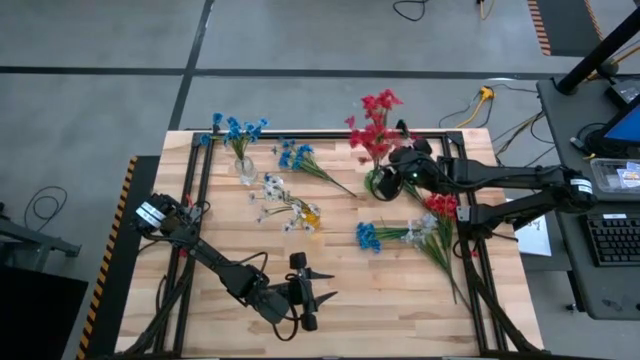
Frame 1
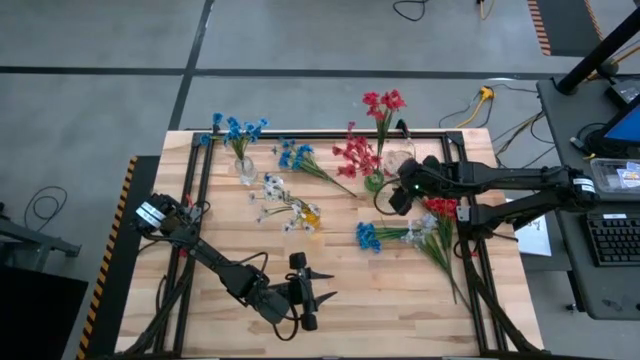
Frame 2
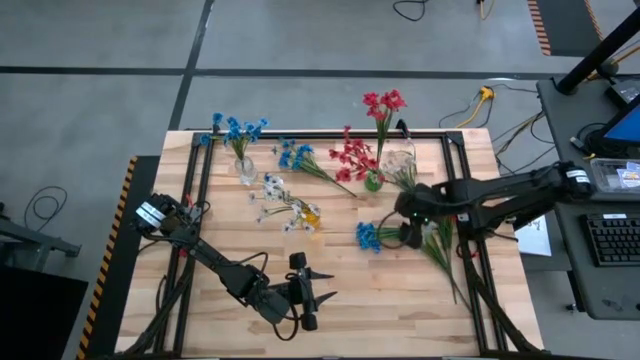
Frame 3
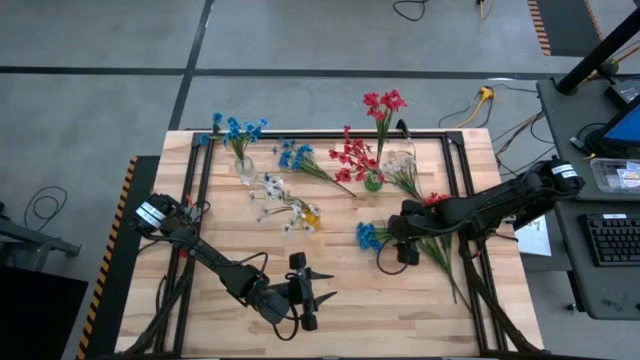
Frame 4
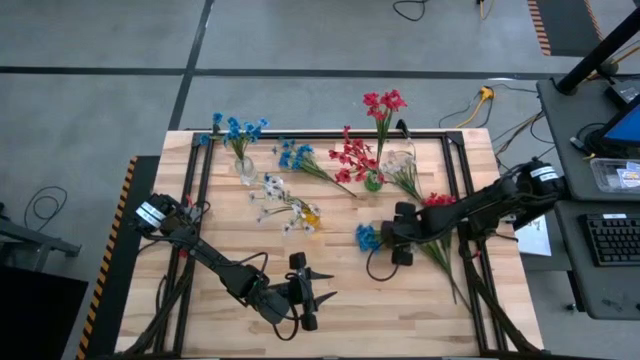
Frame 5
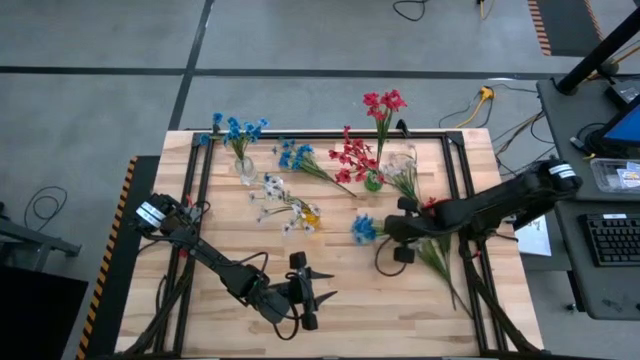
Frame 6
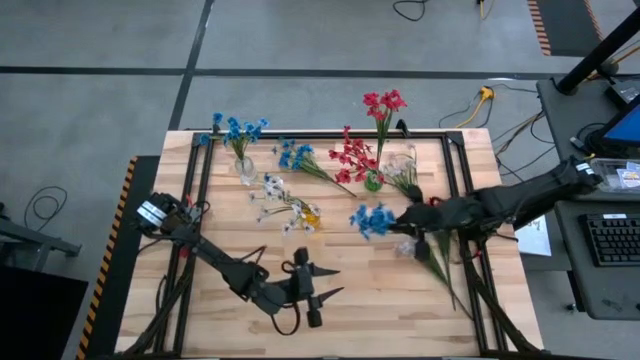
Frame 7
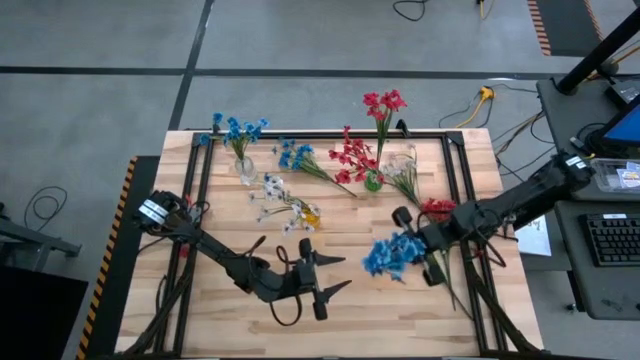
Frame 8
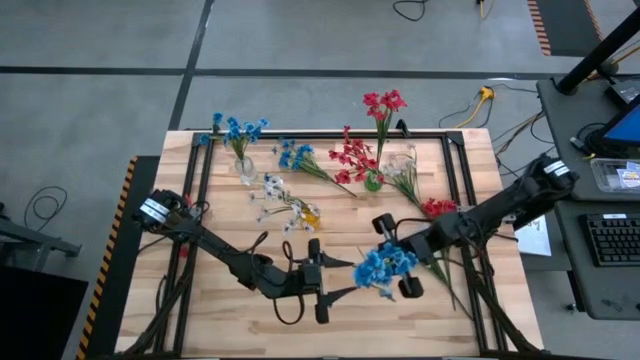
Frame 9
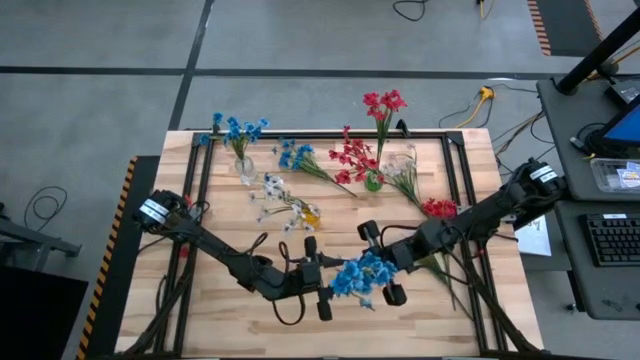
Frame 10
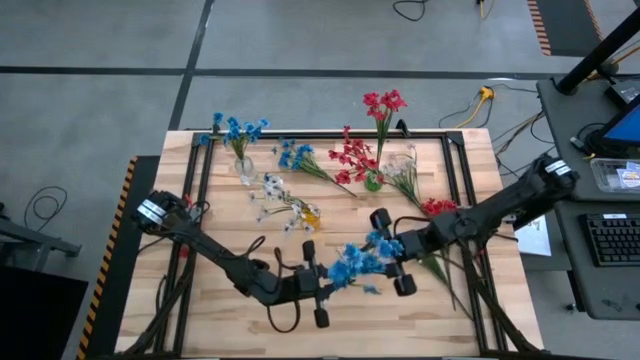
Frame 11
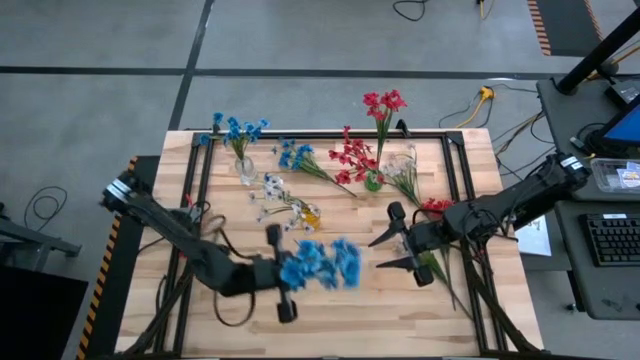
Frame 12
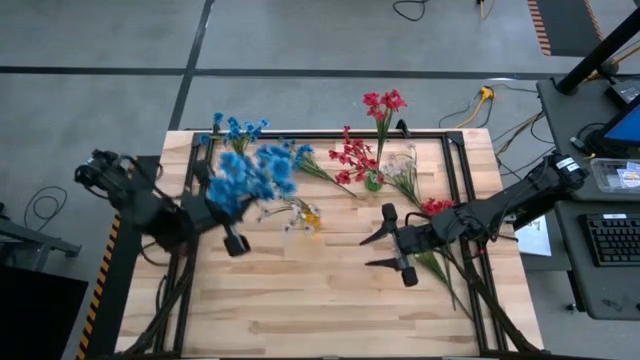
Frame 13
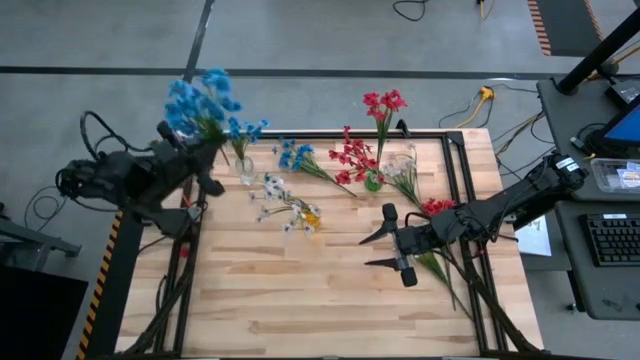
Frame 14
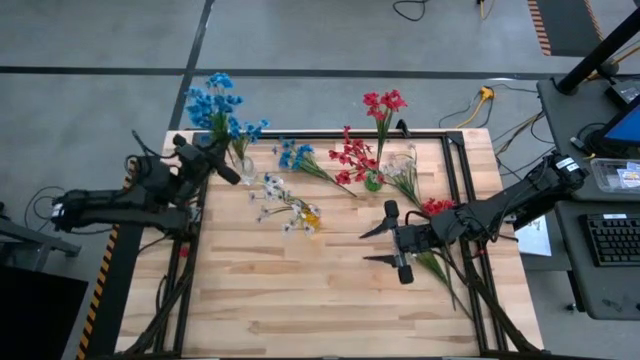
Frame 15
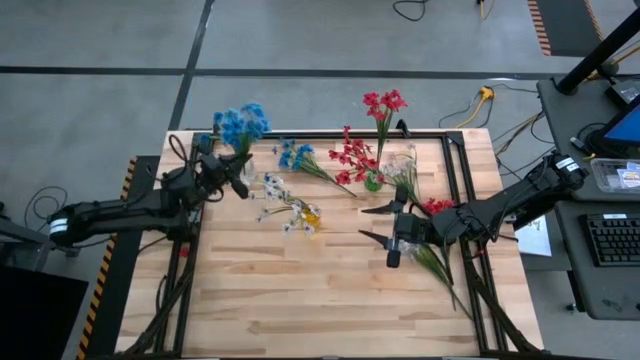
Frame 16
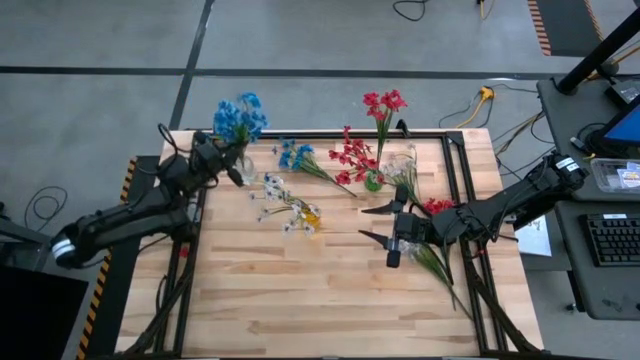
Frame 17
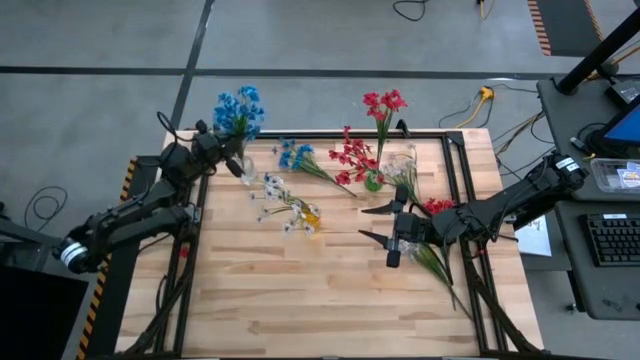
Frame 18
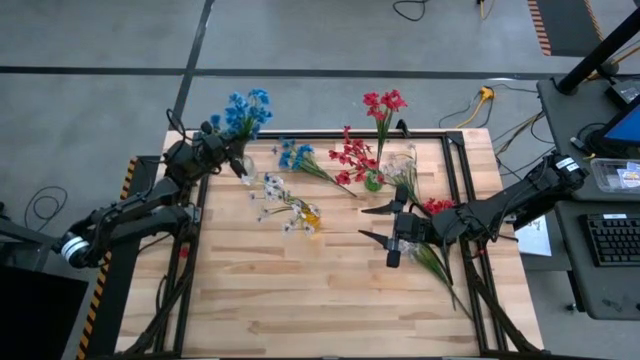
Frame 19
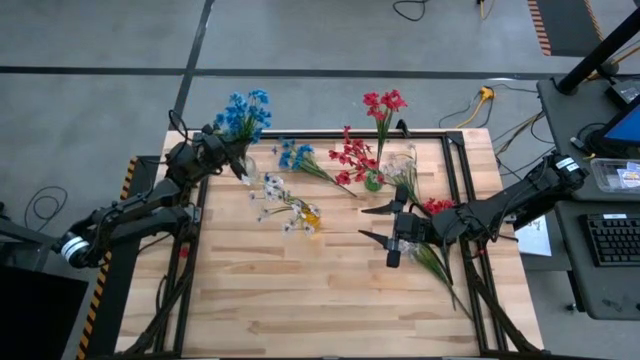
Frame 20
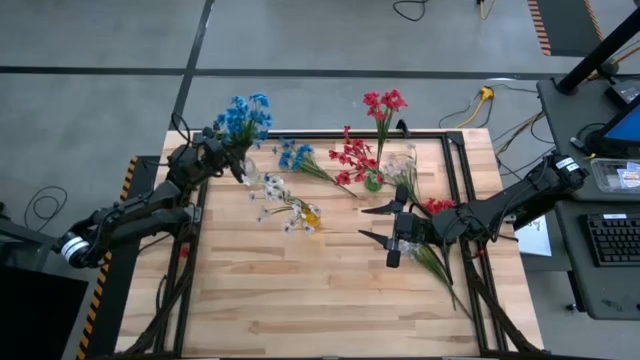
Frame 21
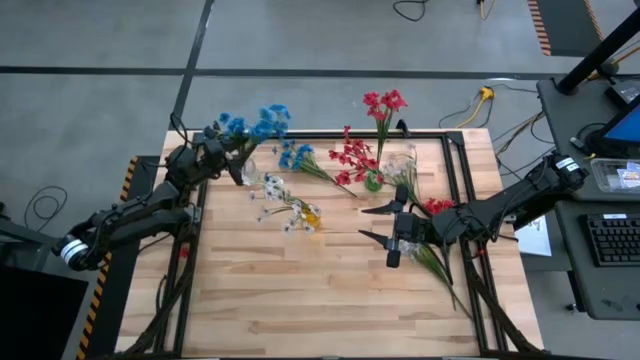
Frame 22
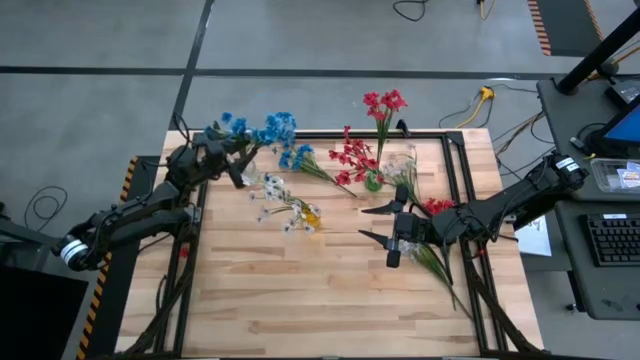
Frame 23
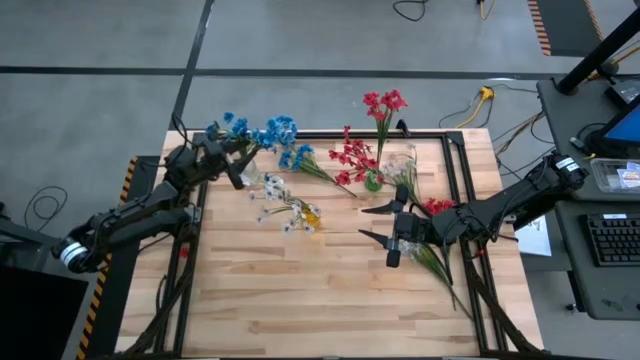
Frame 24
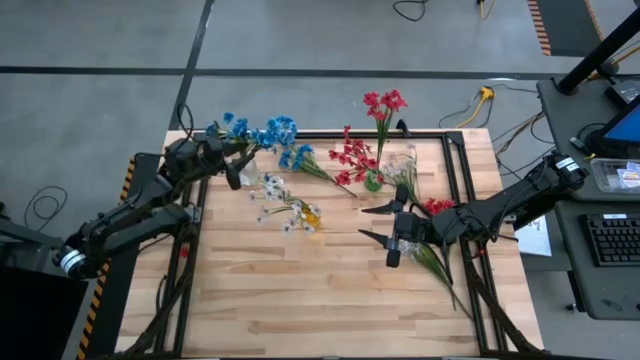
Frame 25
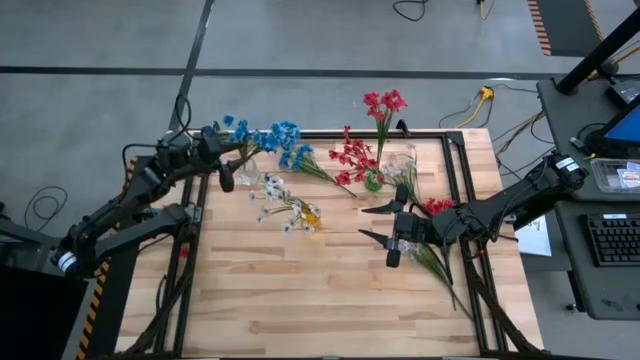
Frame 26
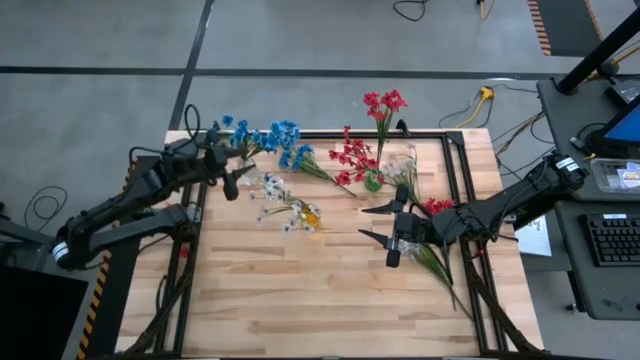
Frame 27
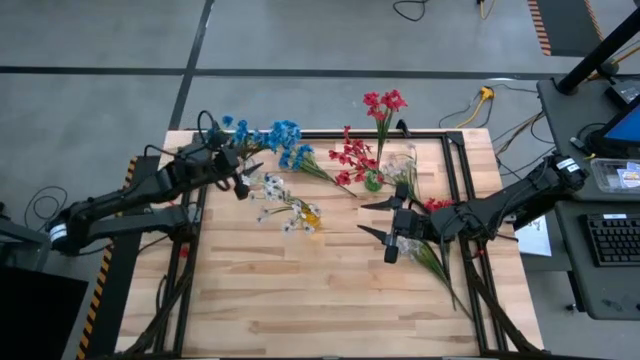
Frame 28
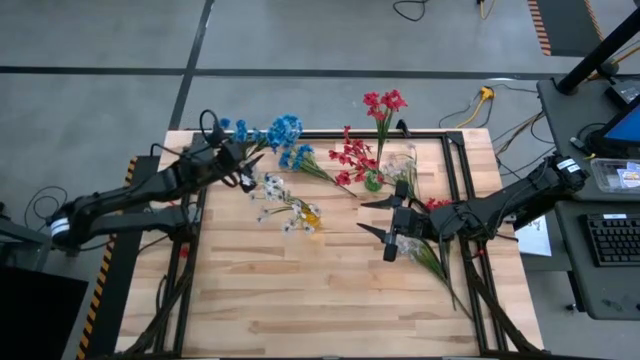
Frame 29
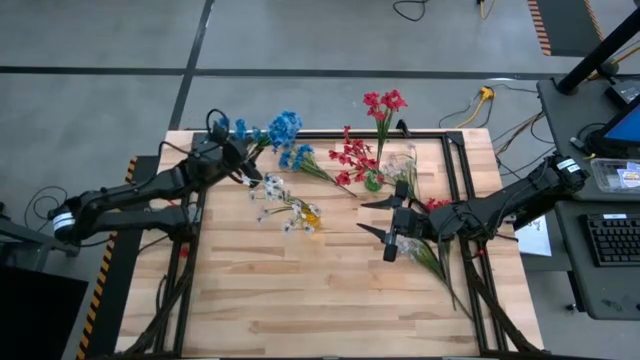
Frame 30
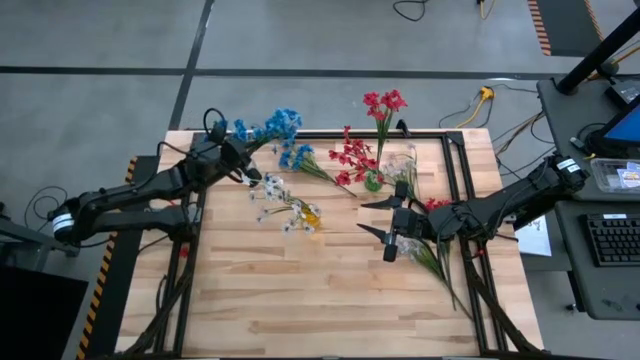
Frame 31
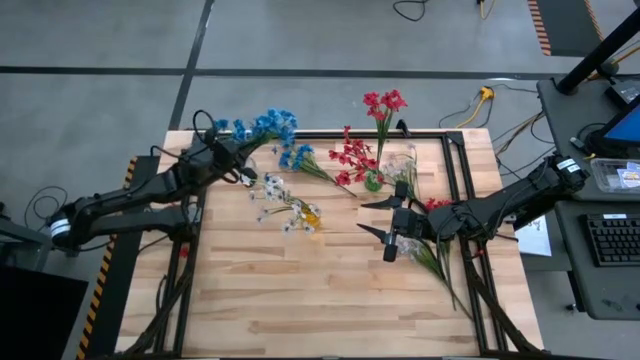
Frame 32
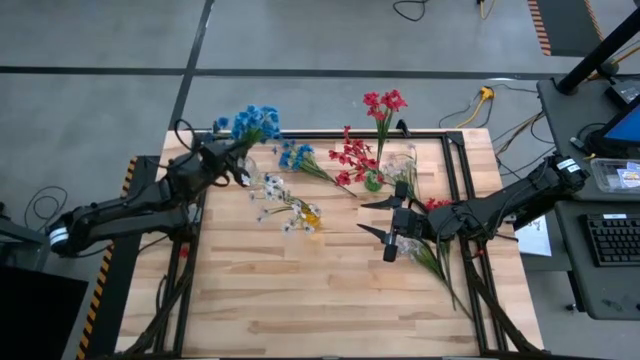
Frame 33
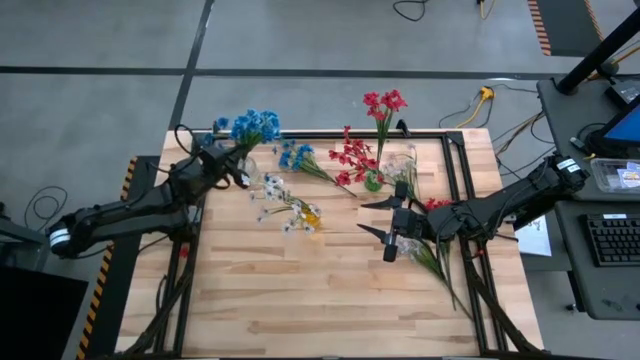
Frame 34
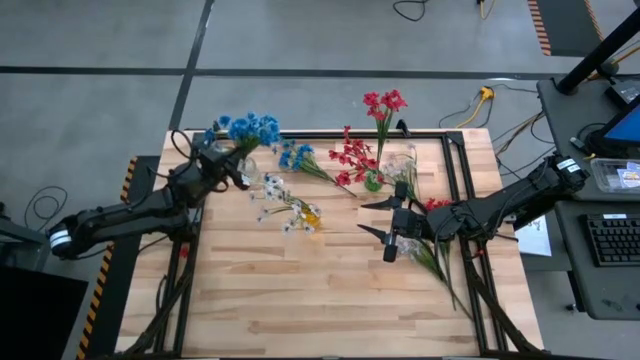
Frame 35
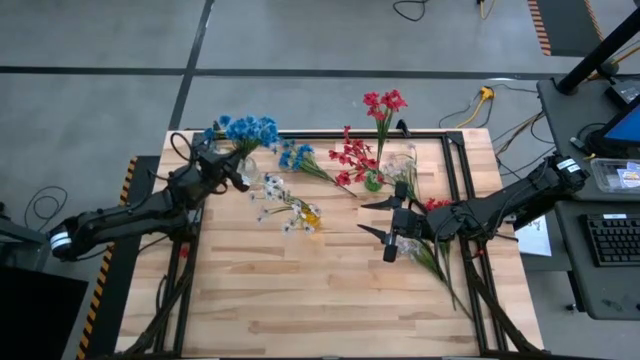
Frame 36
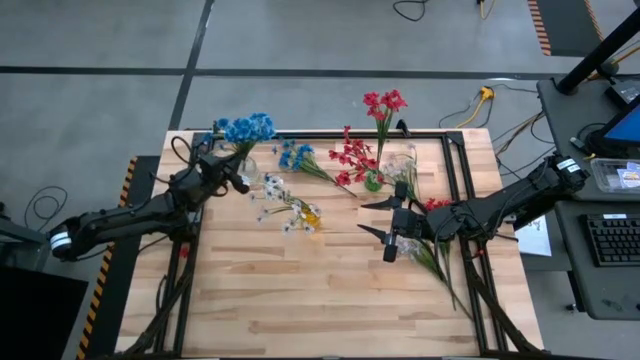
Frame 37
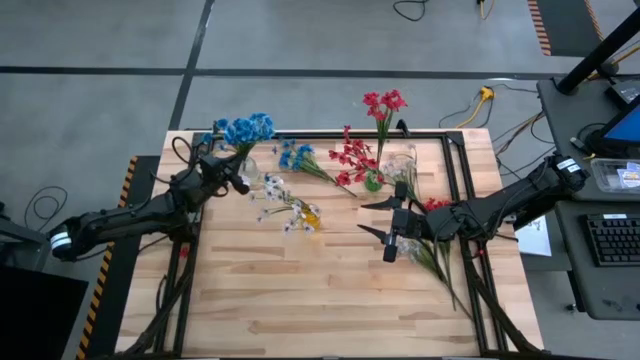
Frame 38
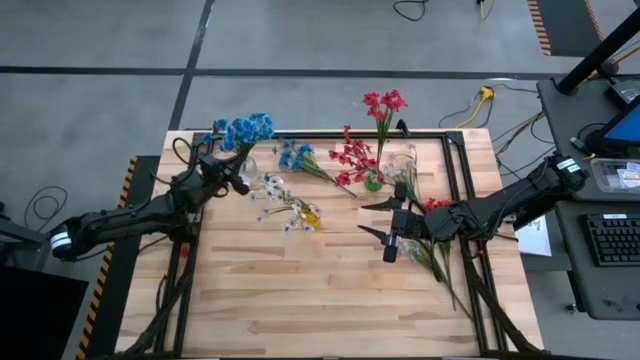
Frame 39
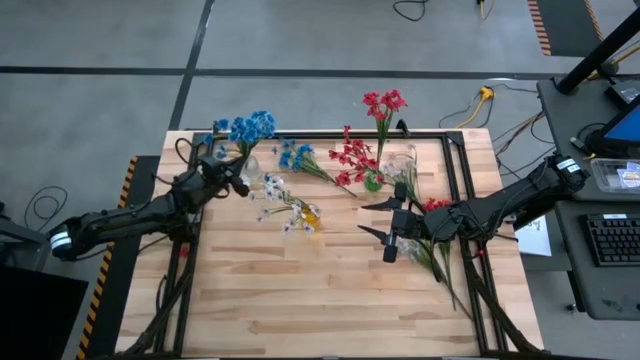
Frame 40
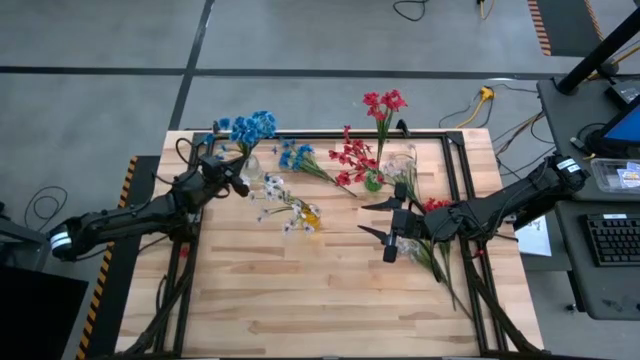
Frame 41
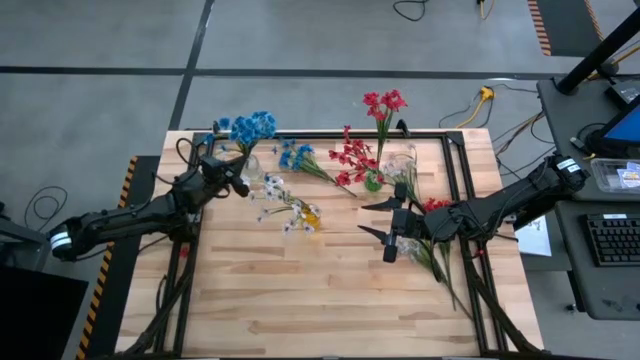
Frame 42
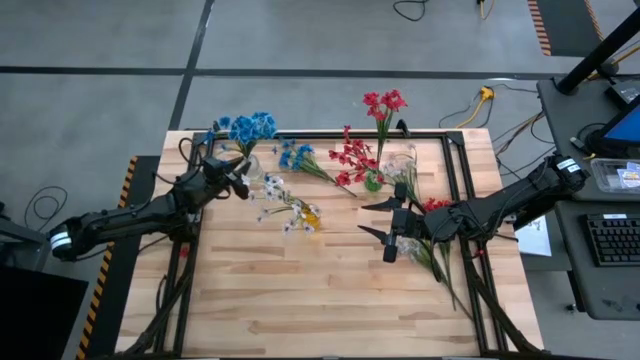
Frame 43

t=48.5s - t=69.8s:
Task: Sort flowers into vase by color
Put the bottom blue flowers into the transparent vase
